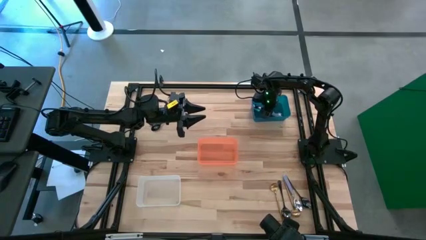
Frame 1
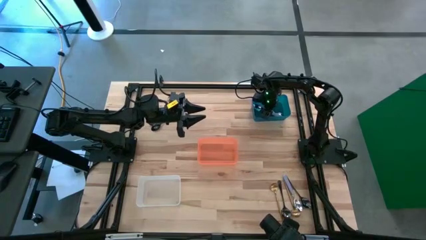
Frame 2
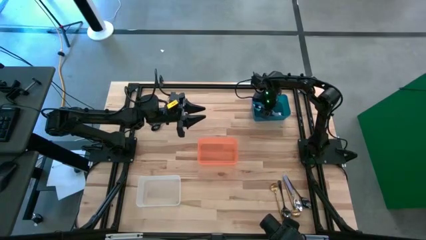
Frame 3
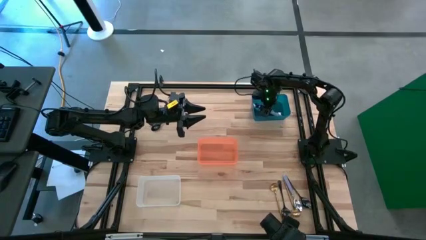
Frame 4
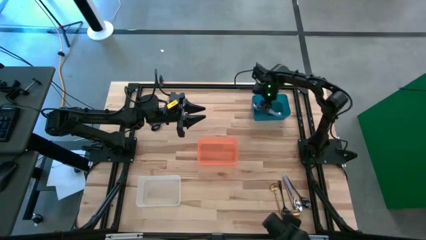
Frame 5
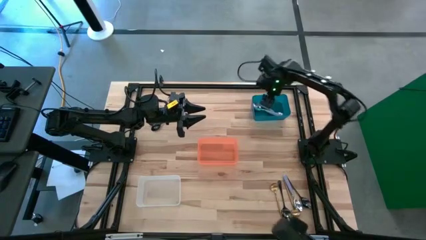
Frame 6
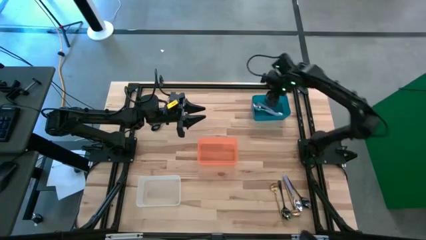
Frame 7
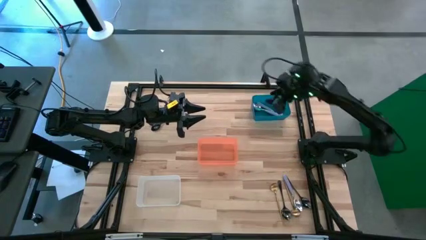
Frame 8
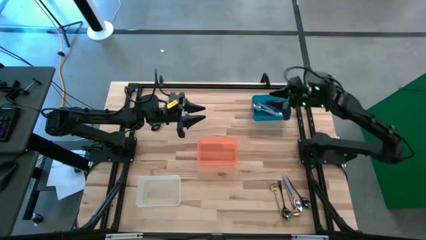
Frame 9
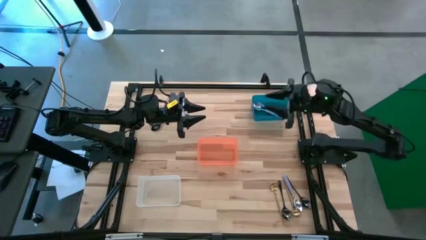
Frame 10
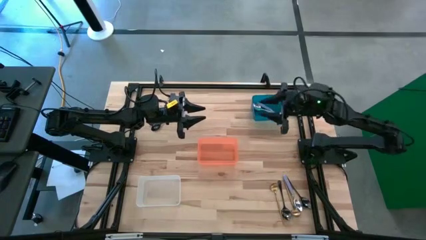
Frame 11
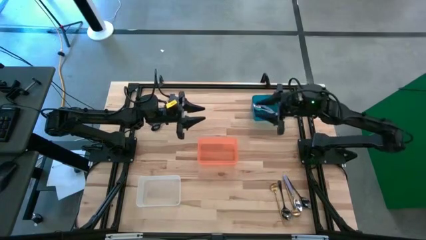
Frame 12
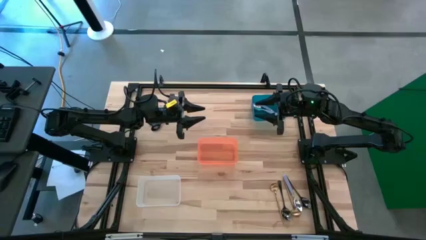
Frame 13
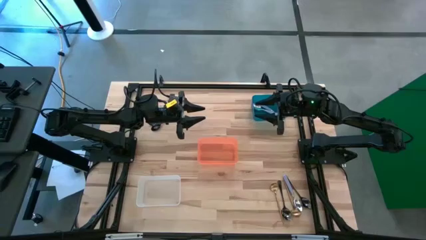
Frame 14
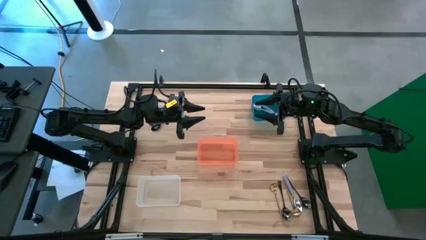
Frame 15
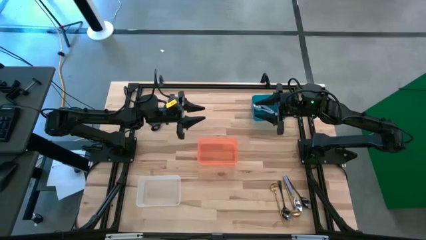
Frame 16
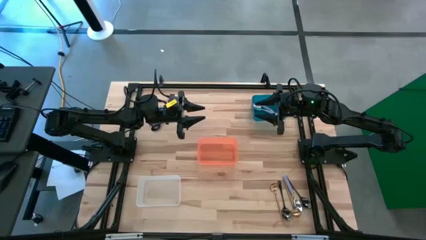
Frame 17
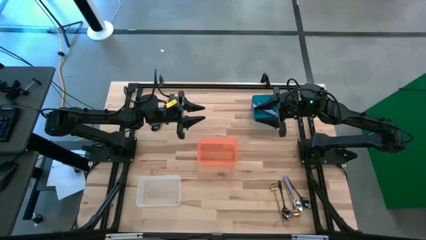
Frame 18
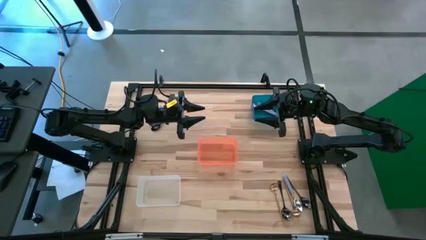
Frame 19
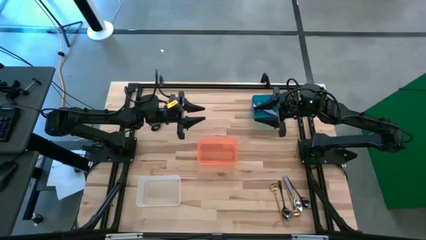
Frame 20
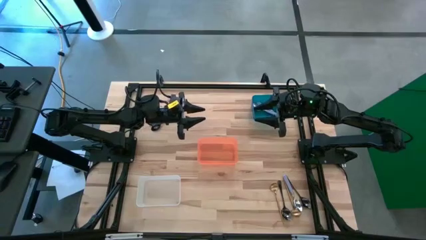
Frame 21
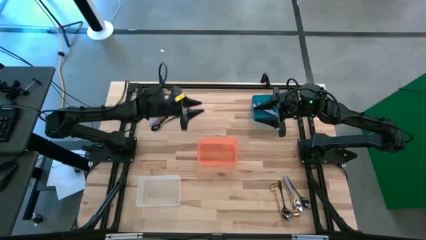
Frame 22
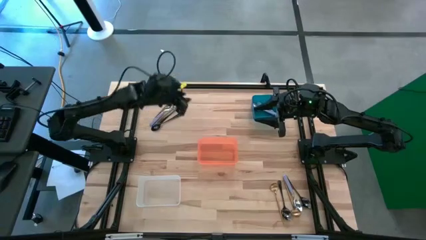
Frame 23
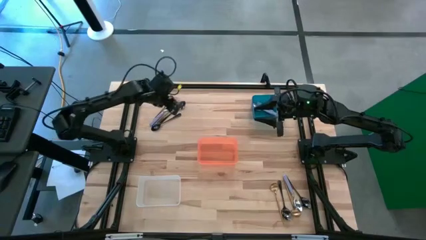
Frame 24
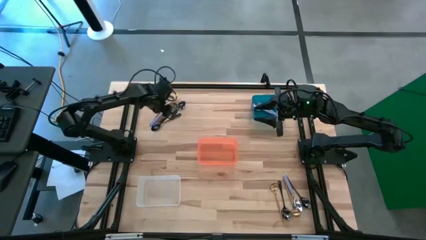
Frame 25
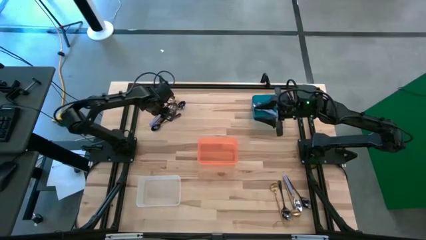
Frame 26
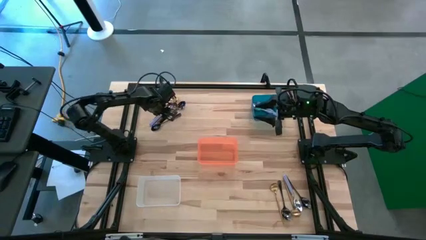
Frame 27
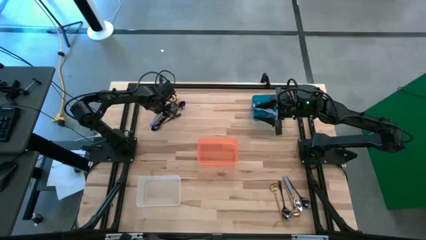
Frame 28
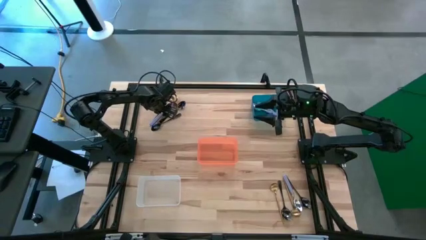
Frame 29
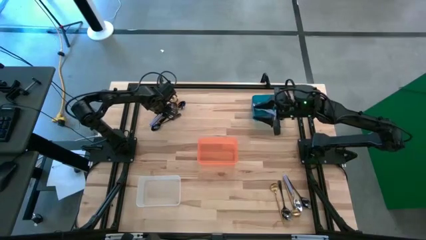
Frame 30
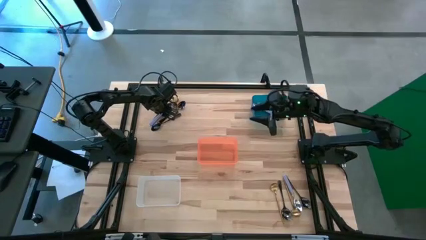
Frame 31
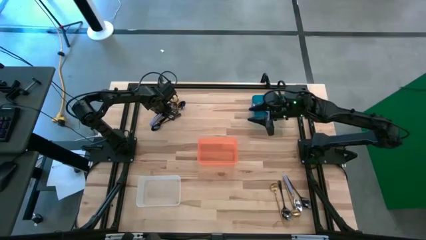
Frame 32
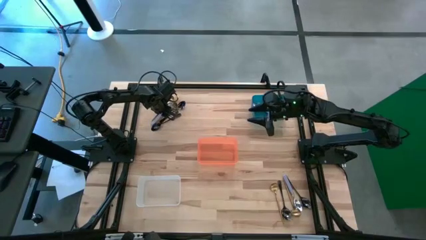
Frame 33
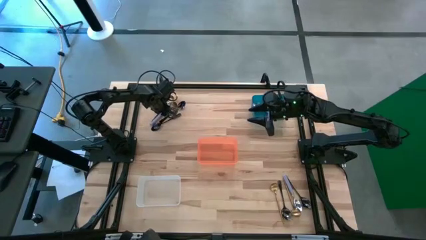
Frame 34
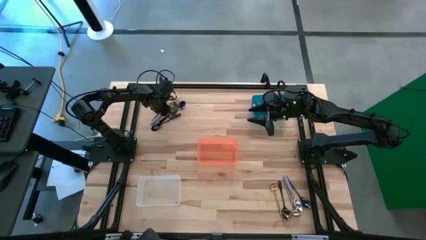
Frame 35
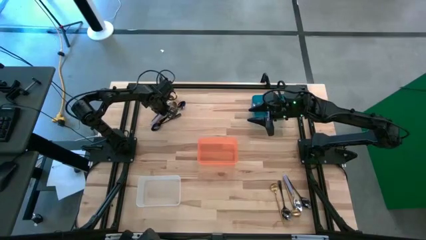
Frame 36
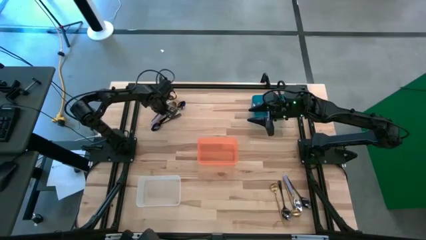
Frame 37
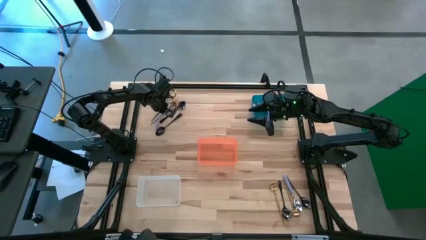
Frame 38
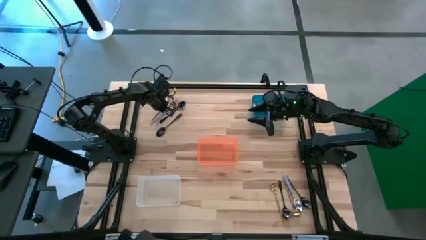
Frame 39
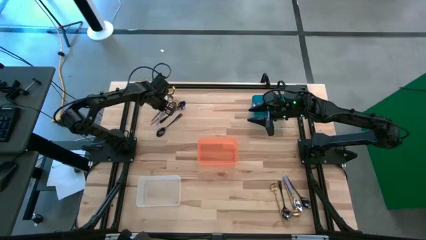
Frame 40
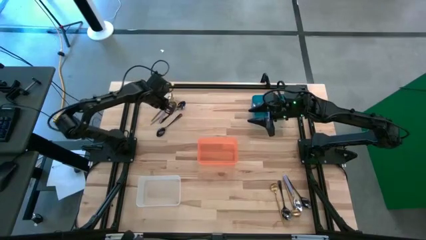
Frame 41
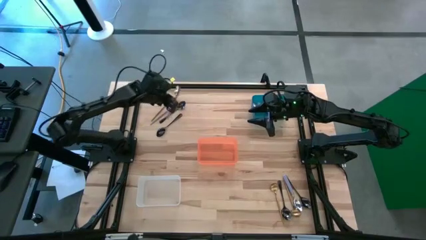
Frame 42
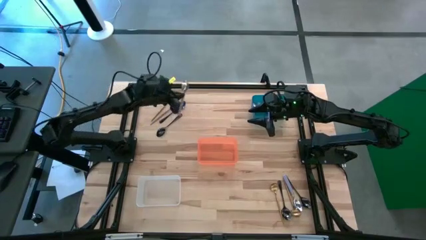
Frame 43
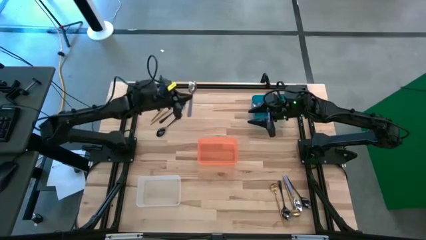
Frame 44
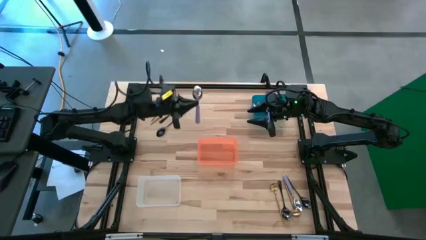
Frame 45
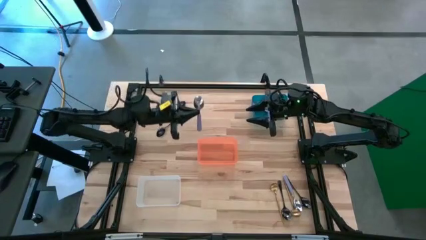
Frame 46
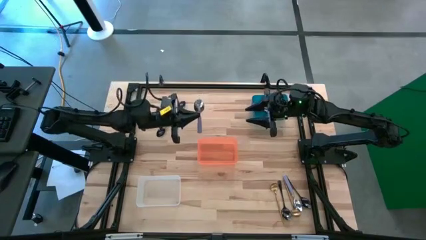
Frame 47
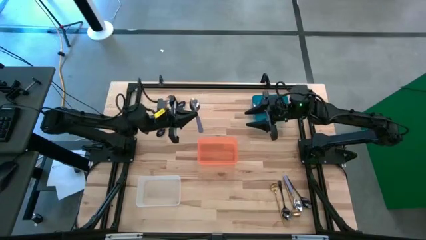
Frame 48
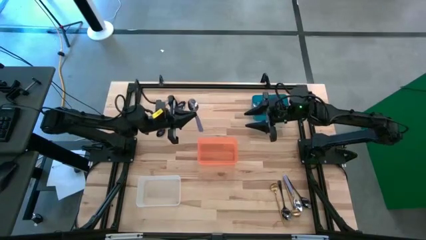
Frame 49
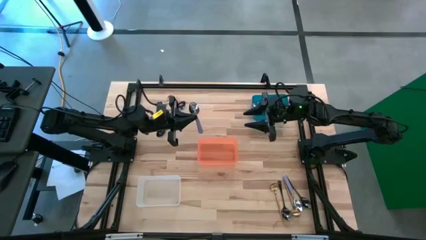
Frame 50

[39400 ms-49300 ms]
Task: Sort silverware by color (type)
Put the top violet spoon into the blue bin

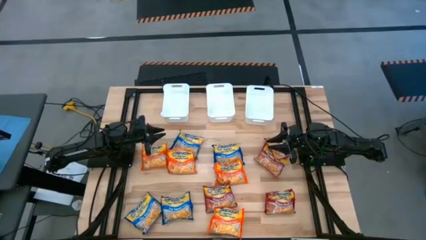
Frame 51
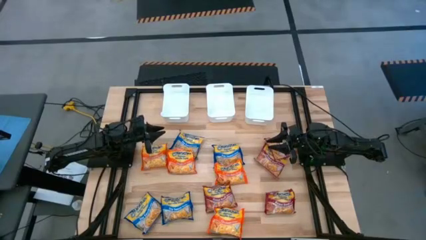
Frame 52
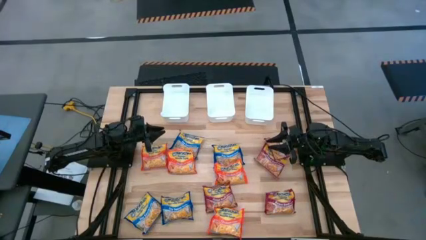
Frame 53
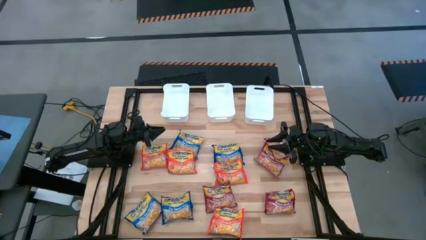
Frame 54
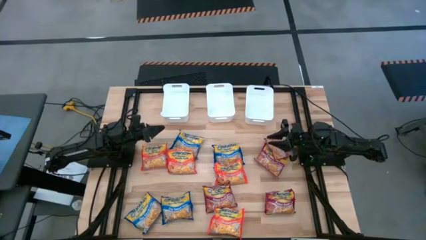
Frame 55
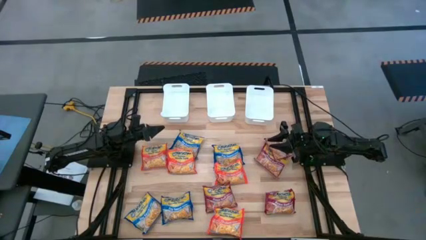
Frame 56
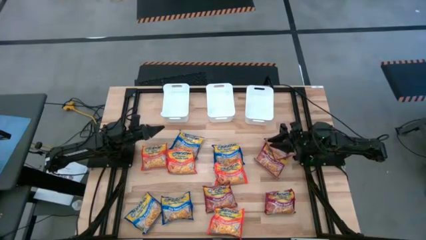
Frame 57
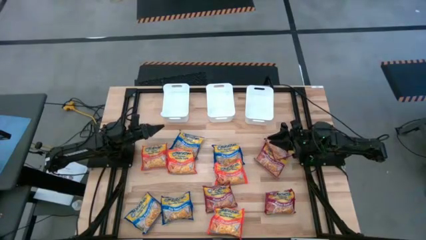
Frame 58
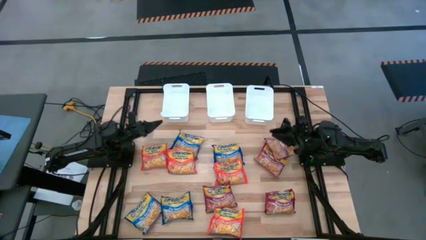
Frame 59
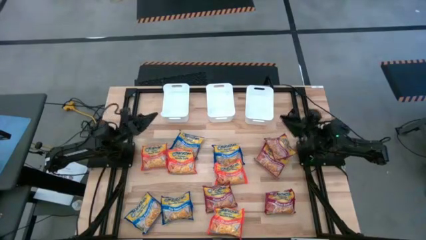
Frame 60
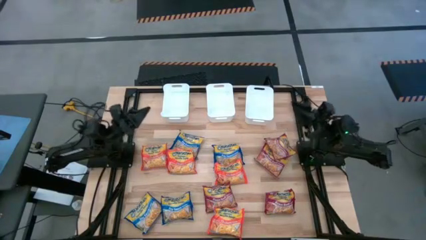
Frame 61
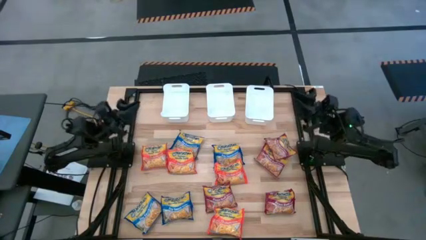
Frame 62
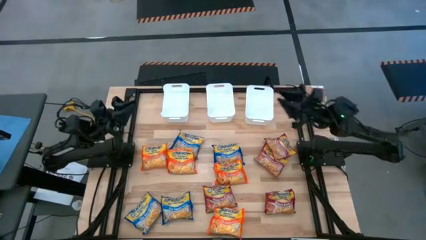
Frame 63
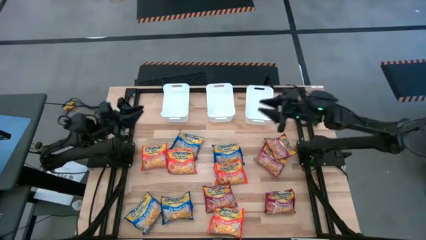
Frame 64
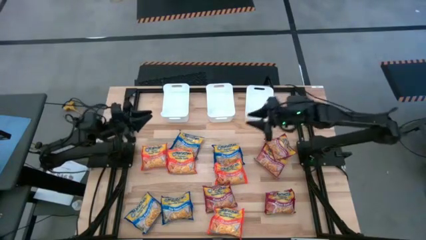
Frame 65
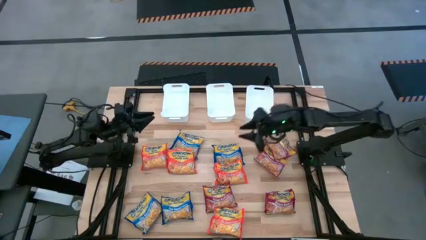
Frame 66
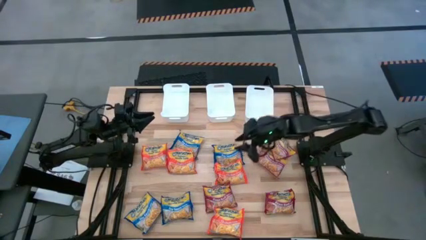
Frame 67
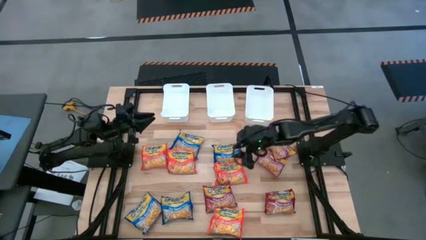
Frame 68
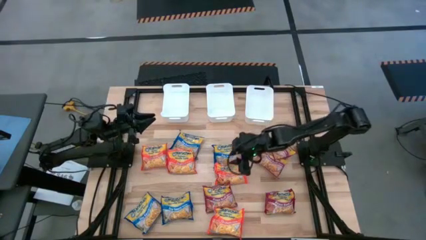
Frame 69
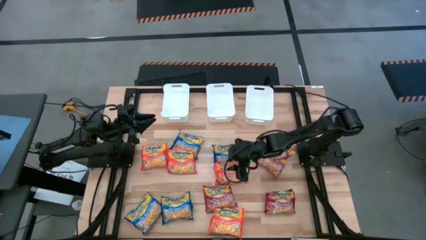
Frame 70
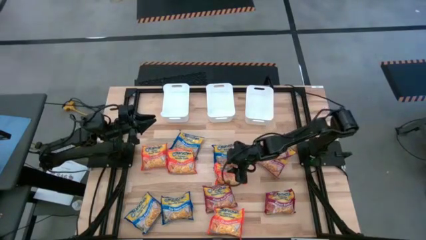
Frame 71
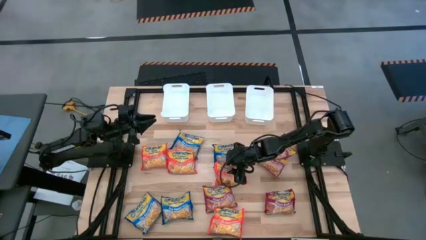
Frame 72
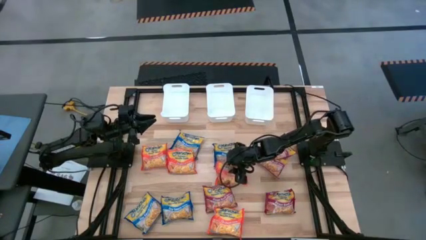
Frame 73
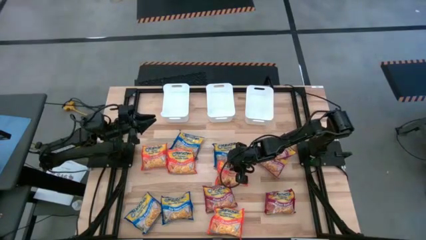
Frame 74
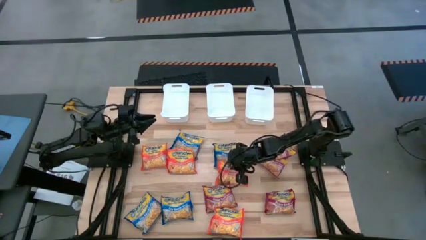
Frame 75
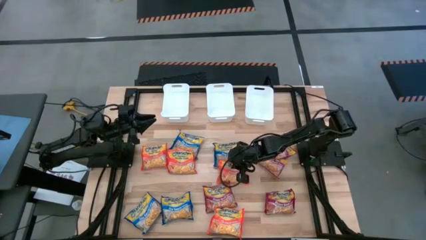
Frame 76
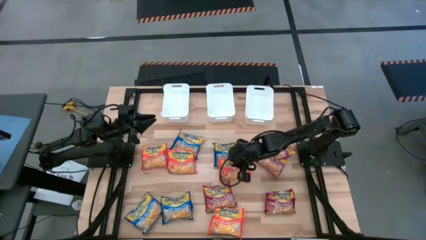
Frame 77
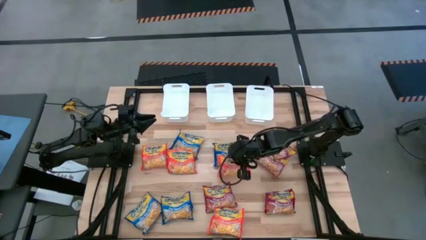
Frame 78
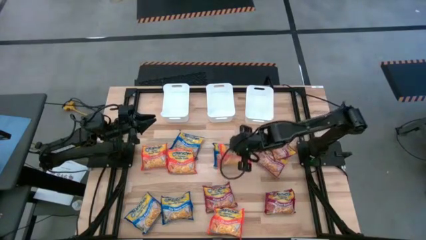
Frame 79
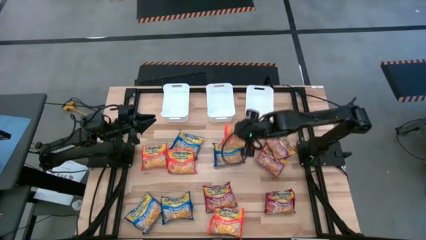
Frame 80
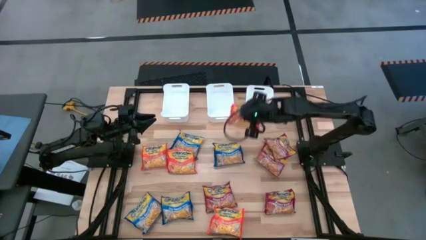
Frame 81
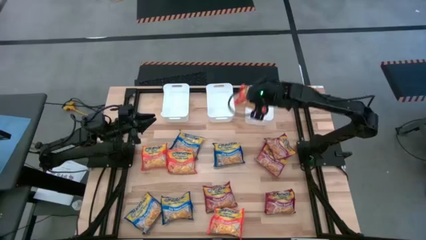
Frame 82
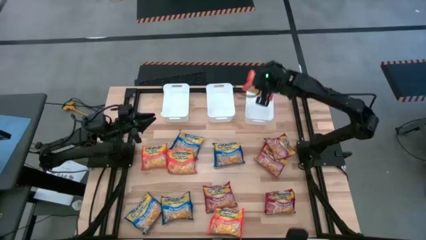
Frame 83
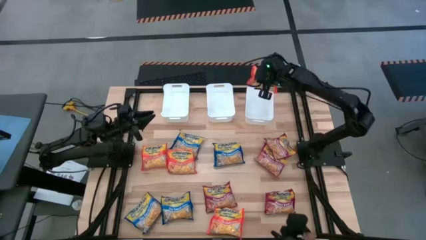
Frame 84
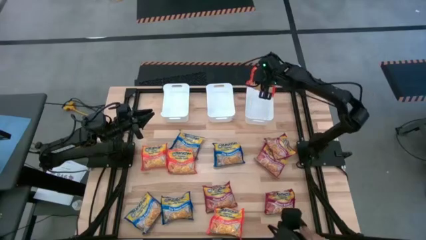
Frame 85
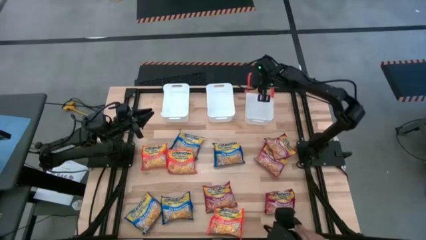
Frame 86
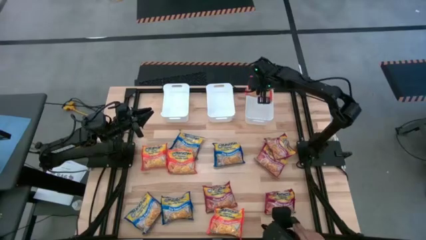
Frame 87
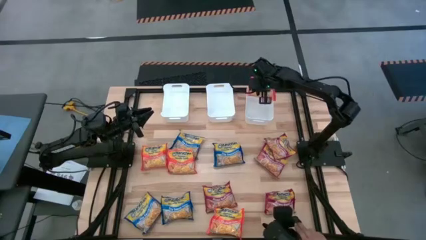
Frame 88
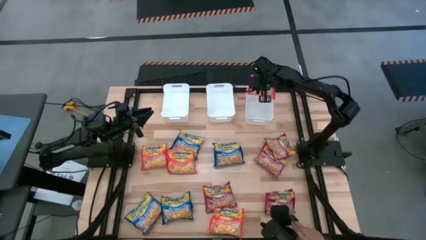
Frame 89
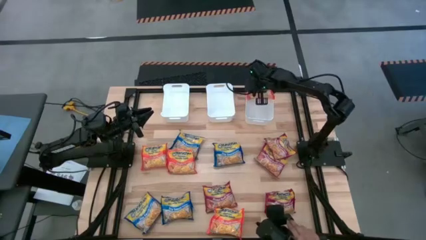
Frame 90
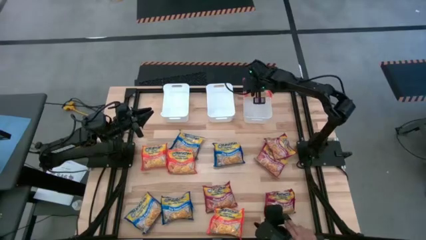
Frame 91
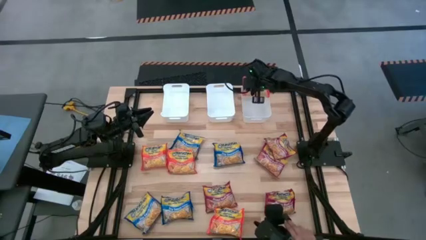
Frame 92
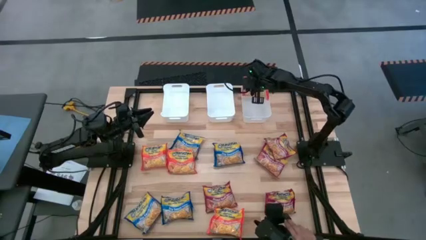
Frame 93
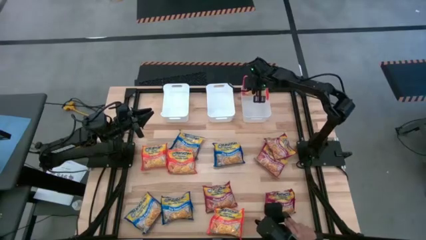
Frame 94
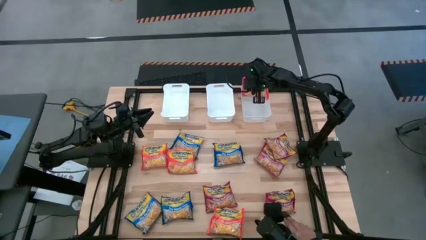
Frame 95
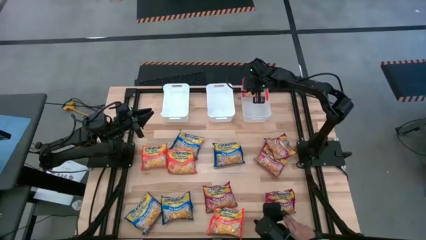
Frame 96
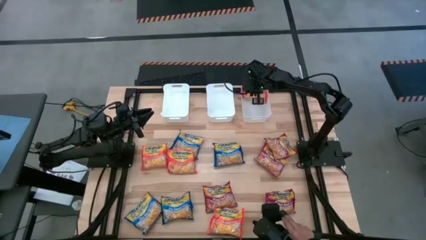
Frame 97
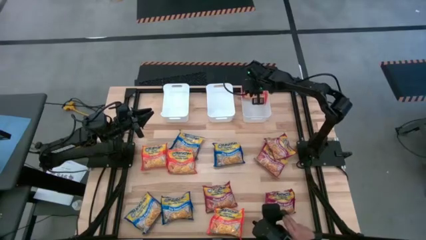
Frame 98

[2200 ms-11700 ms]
Task: Sort Maruchan noodles
Put the top right orange noodle pack into the top right white bin
